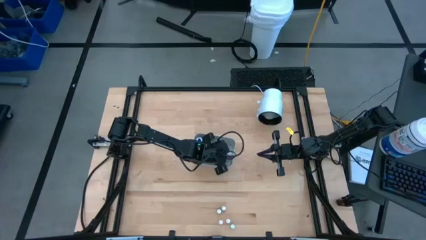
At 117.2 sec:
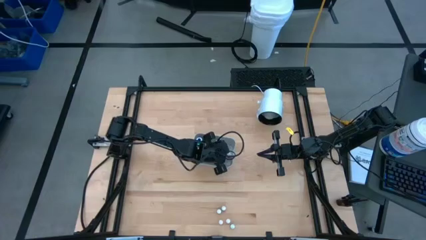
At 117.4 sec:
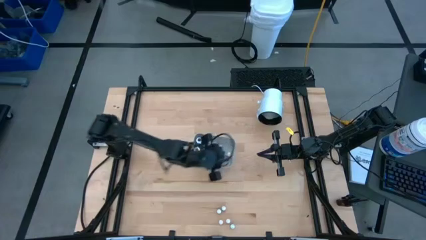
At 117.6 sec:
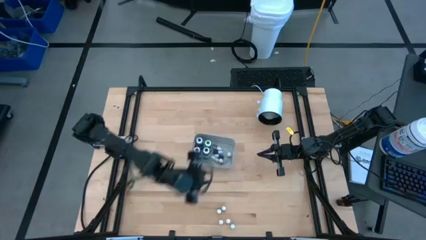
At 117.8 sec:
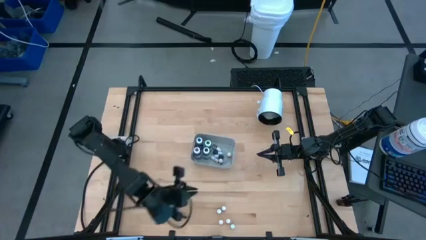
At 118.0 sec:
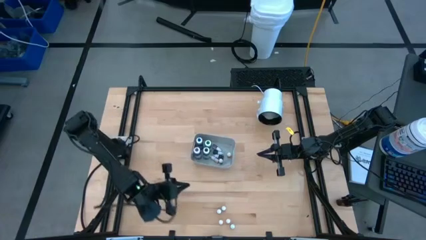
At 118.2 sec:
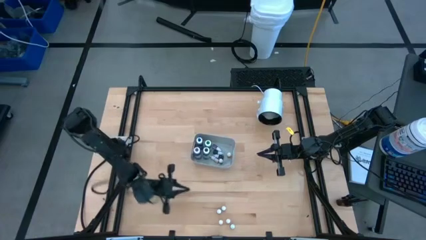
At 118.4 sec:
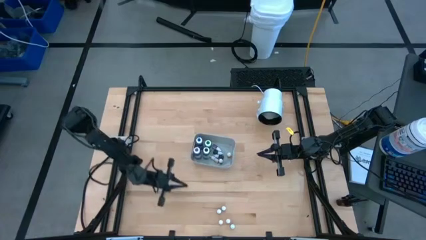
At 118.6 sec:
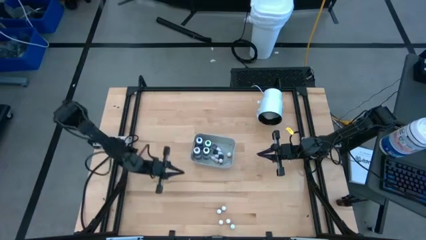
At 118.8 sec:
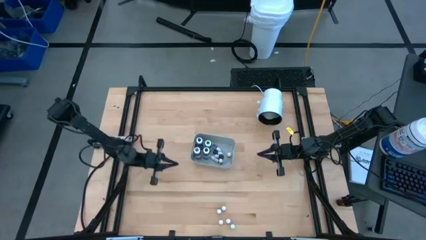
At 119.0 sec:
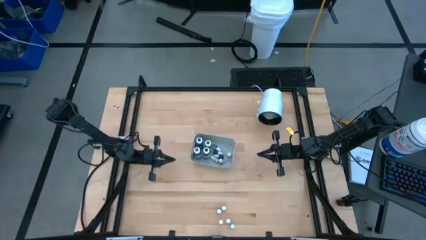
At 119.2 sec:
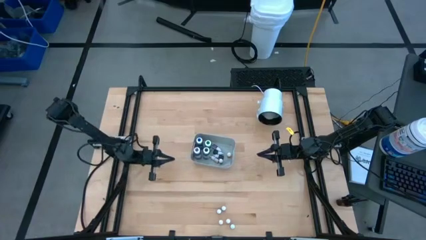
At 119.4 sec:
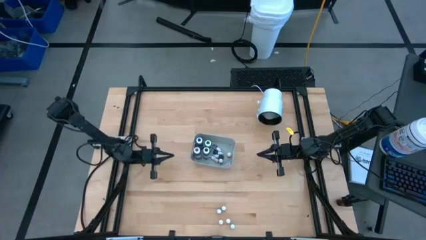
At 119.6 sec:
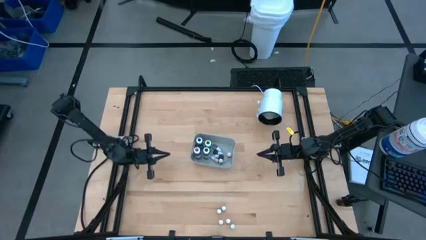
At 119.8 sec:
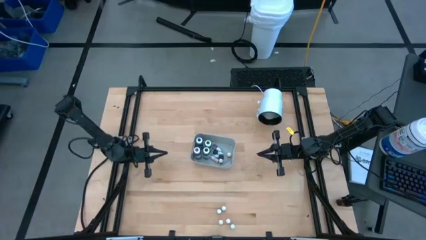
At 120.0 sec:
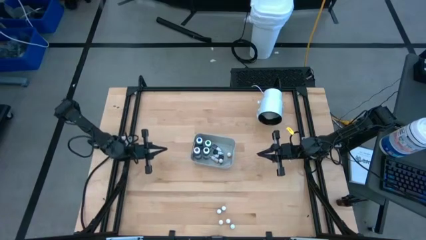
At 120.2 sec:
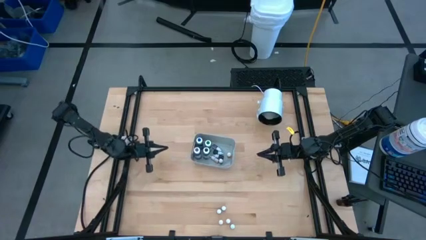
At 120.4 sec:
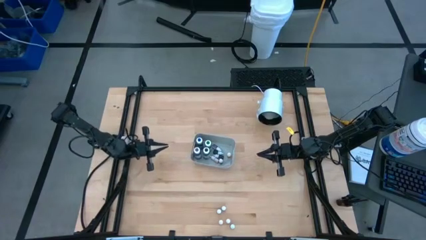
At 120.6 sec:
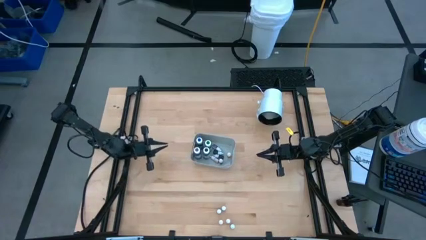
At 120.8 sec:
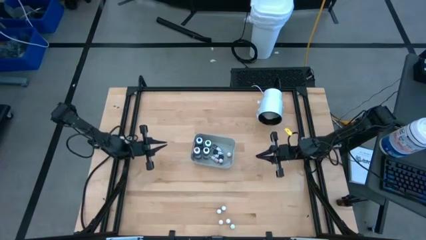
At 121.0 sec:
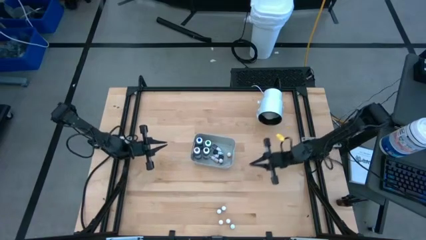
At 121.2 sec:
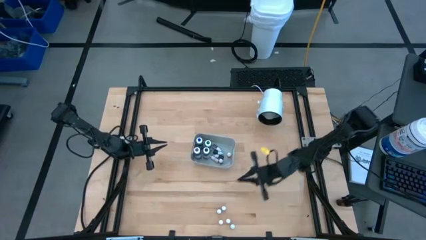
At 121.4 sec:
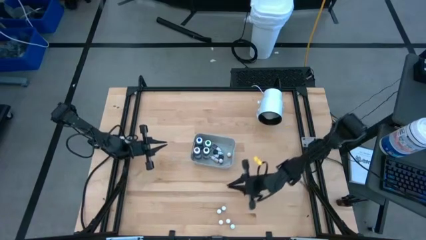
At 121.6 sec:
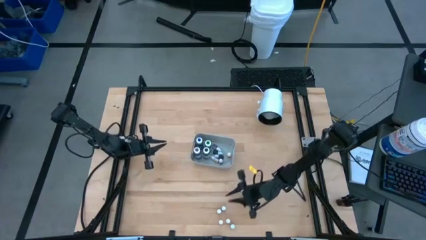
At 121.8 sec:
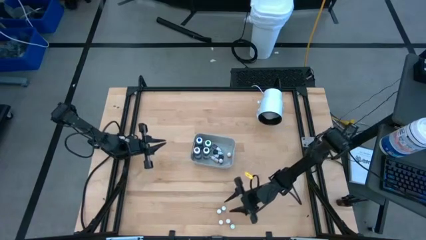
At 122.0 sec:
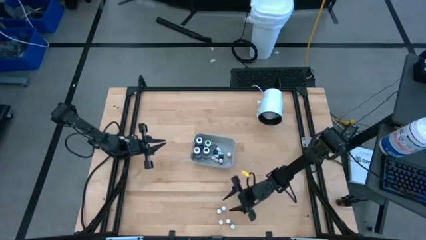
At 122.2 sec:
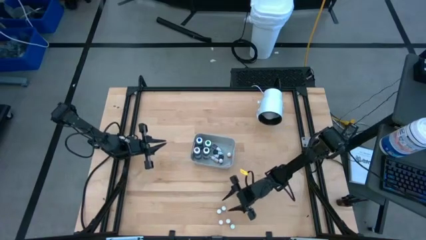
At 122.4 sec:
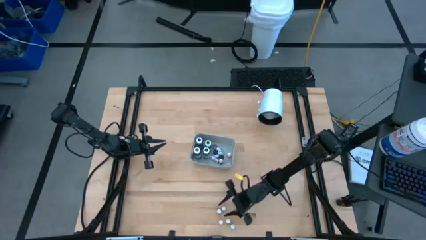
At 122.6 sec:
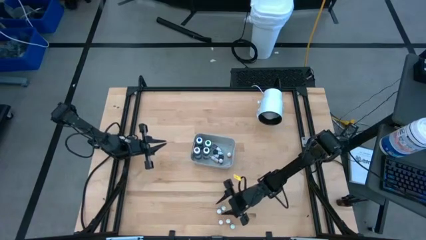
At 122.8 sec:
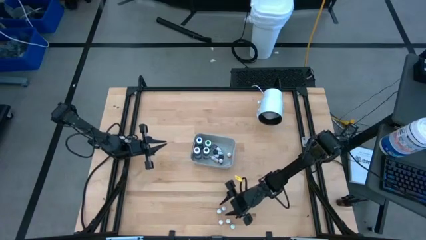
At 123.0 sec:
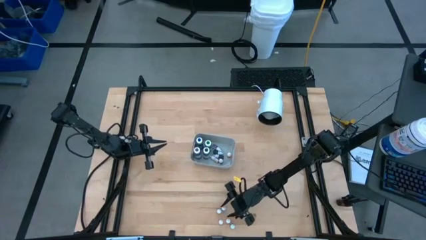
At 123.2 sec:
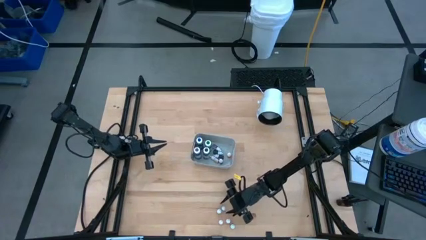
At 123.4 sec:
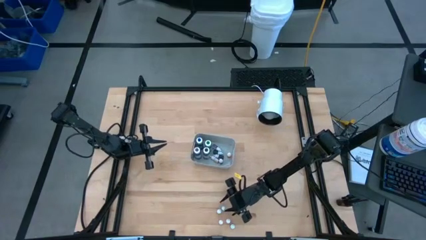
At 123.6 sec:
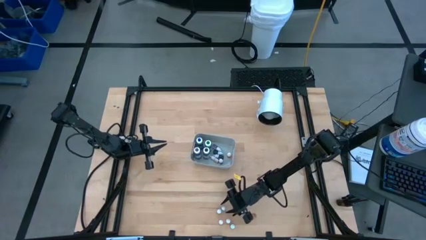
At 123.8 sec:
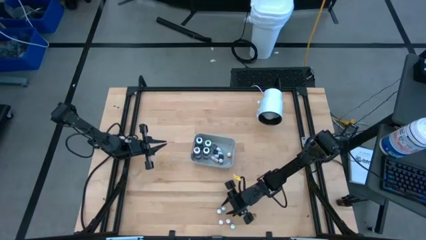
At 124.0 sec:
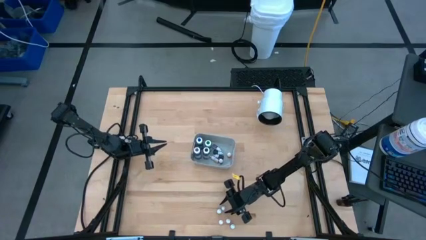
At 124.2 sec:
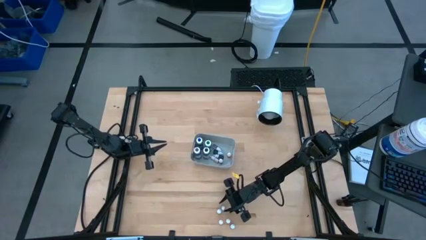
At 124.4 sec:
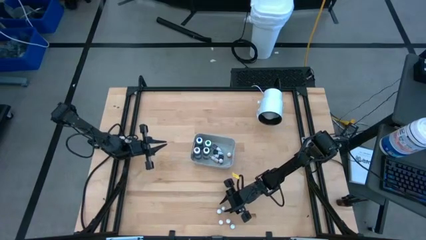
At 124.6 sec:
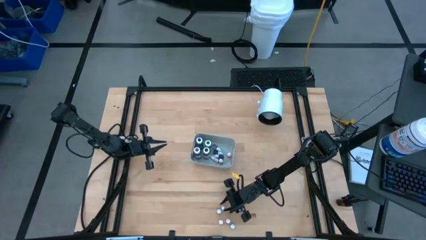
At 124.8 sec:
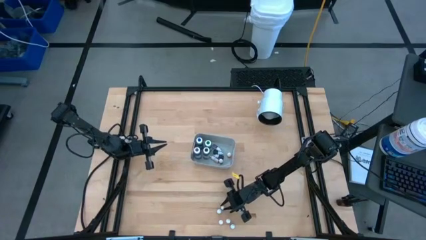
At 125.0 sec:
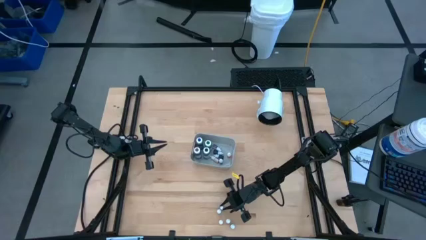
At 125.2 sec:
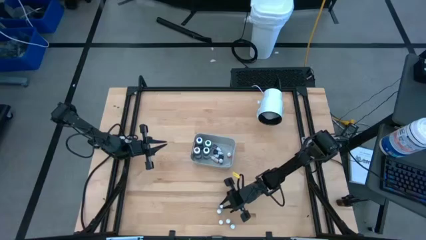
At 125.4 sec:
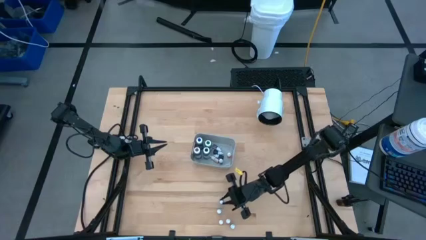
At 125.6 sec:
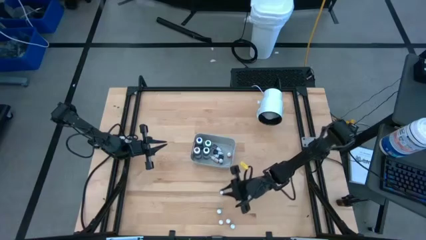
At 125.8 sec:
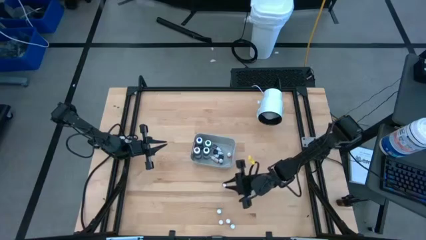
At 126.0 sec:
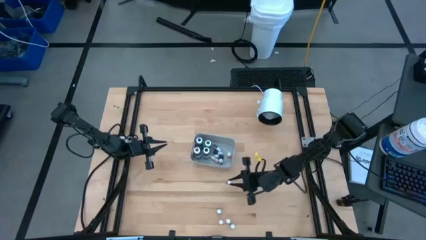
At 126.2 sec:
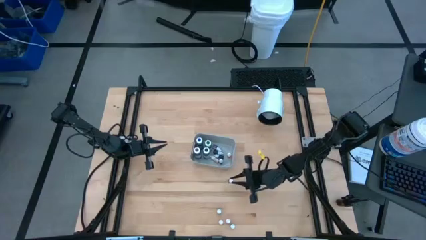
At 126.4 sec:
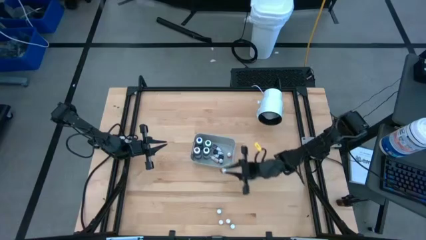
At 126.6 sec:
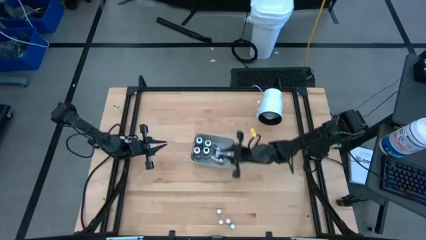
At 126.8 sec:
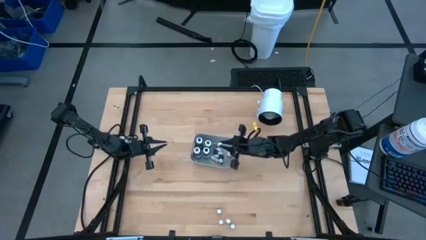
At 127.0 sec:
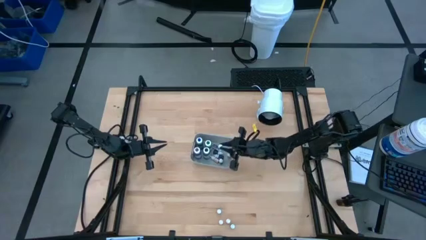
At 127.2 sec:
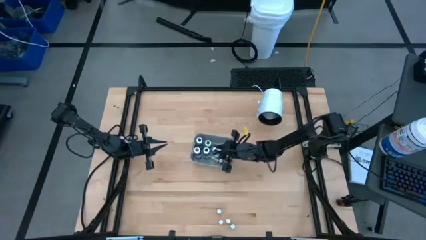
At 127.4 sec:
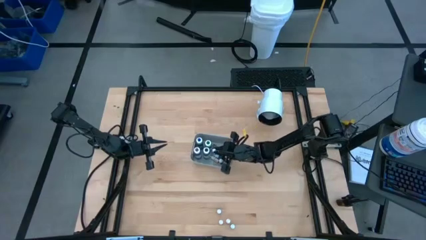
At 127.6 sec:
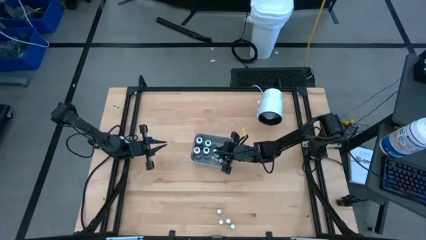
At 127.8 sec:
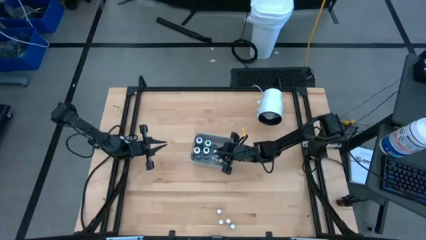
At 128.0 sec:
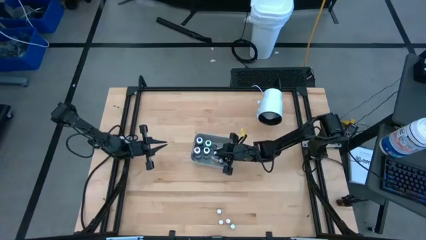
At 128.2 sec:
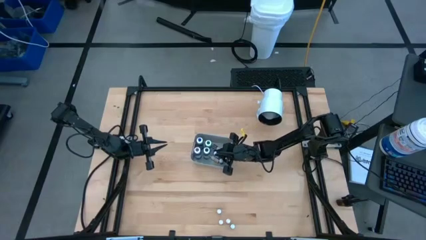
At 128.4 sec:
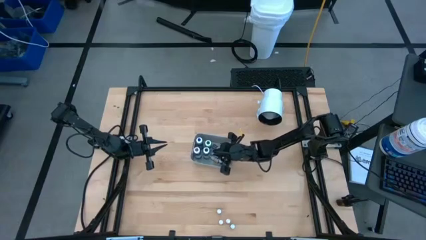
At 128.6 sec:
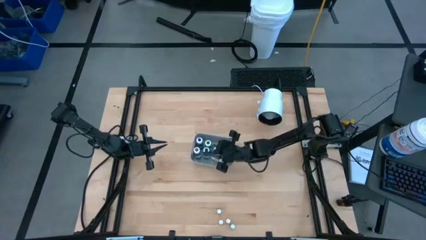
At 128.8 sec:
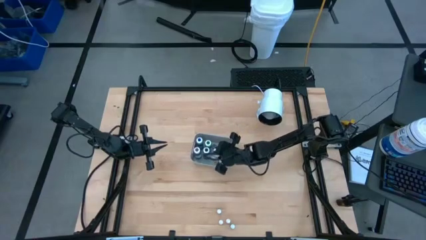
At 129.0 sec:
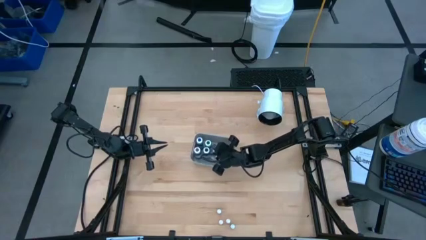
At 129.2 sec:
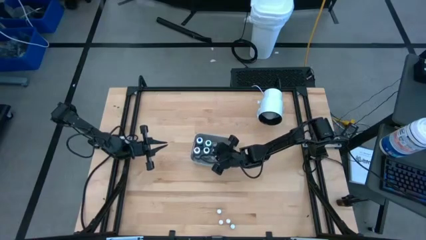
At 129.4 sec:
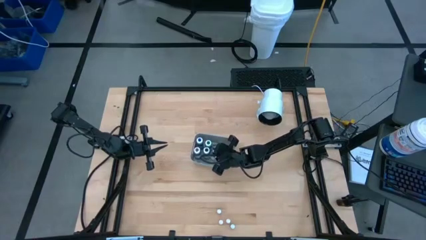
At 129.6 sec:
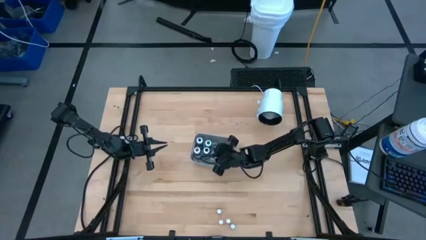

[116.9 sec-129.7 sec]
Task: Pick & Place food coloring
Put the purple food coloring bottle into the gray bin
